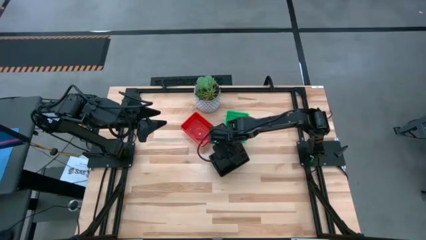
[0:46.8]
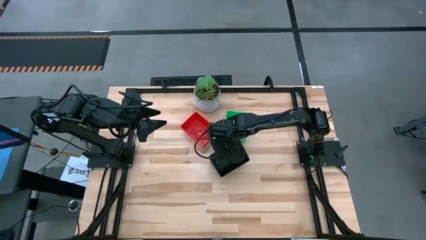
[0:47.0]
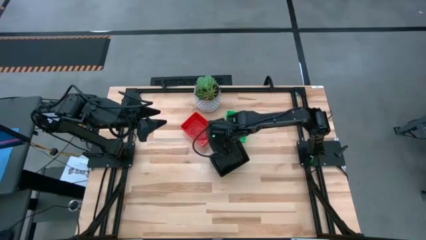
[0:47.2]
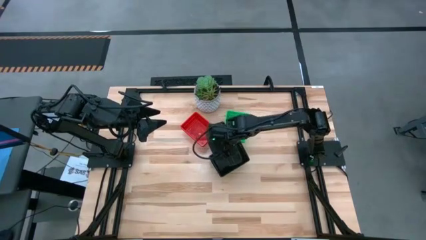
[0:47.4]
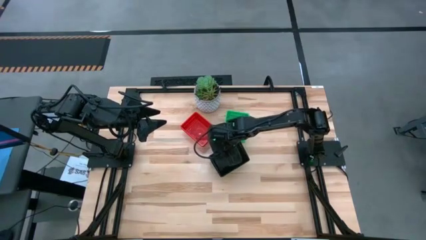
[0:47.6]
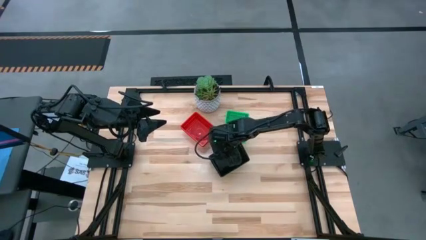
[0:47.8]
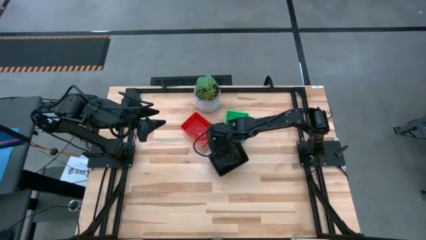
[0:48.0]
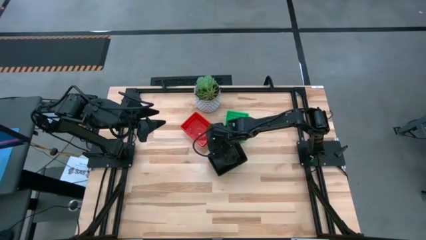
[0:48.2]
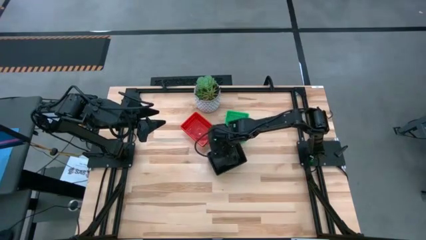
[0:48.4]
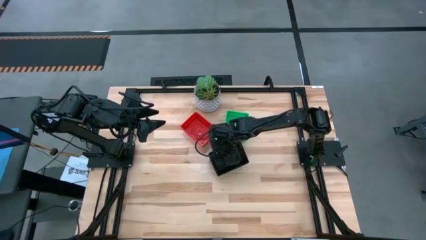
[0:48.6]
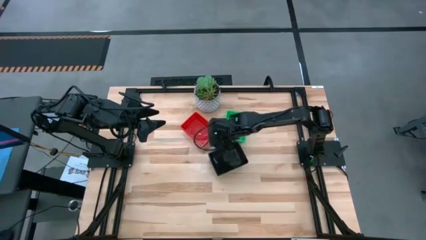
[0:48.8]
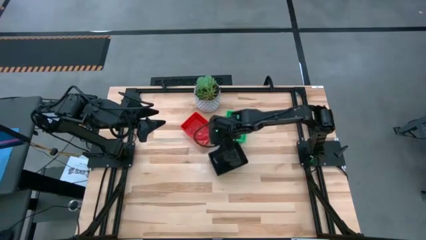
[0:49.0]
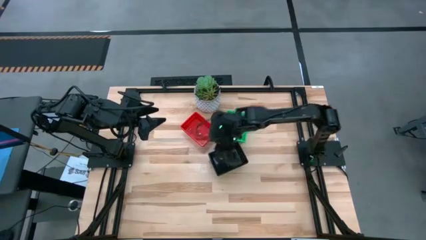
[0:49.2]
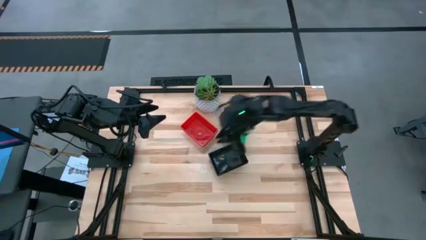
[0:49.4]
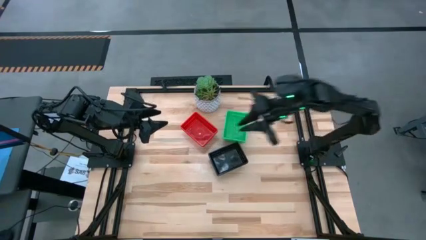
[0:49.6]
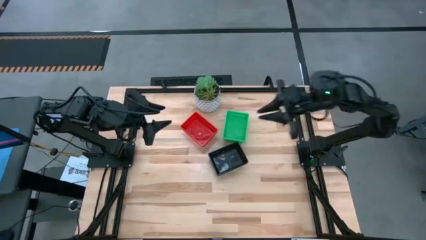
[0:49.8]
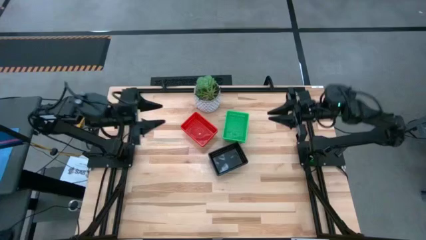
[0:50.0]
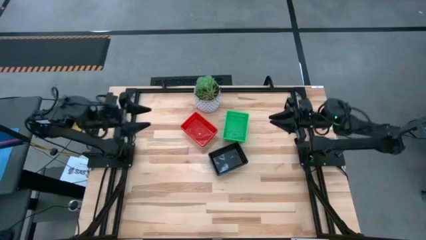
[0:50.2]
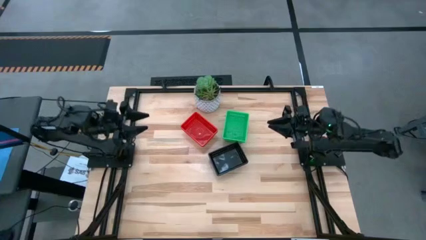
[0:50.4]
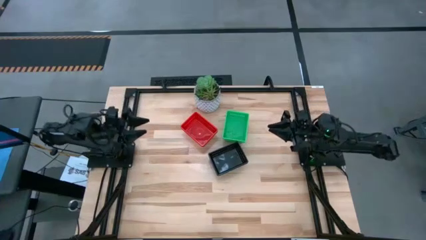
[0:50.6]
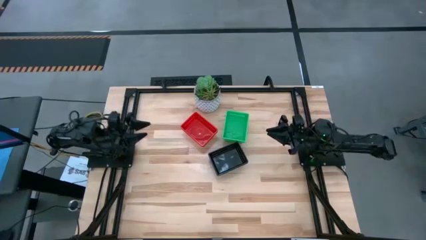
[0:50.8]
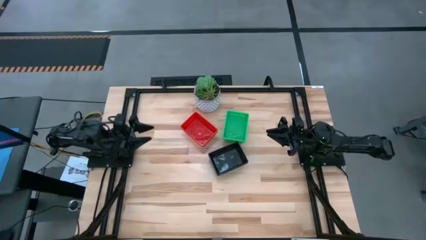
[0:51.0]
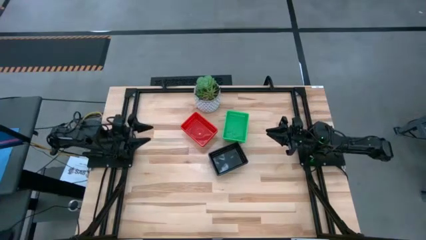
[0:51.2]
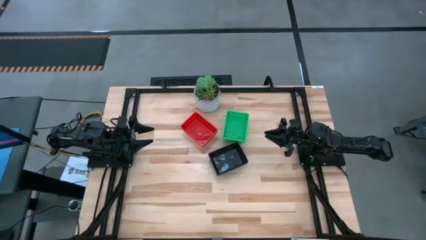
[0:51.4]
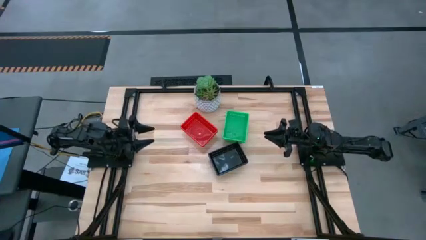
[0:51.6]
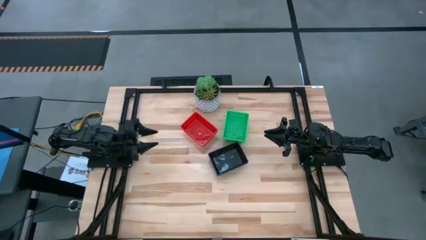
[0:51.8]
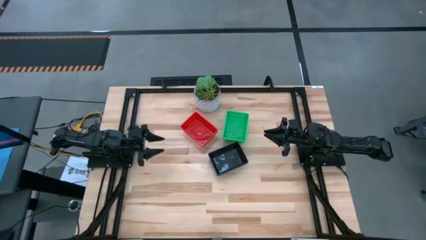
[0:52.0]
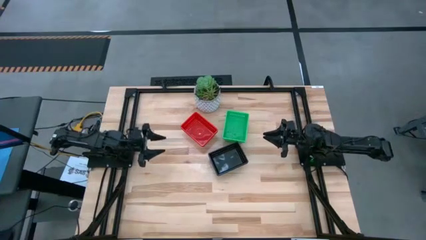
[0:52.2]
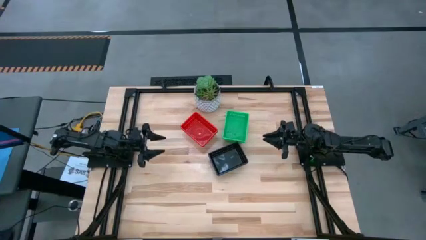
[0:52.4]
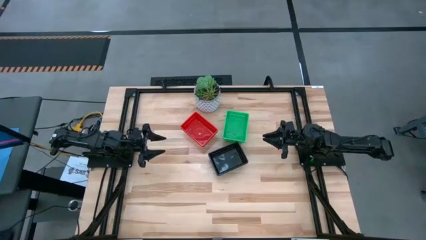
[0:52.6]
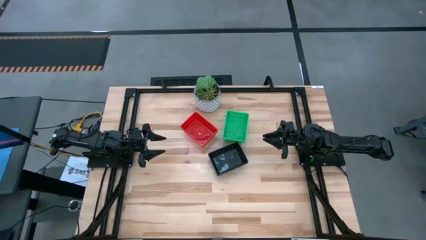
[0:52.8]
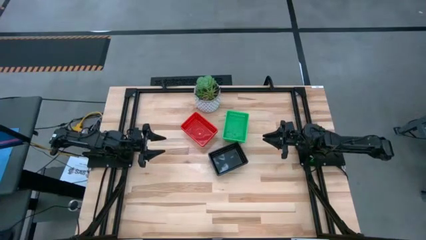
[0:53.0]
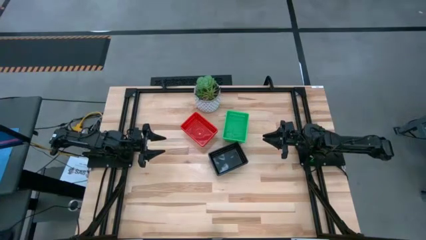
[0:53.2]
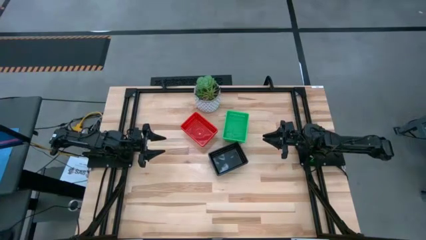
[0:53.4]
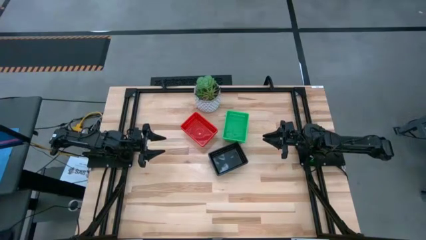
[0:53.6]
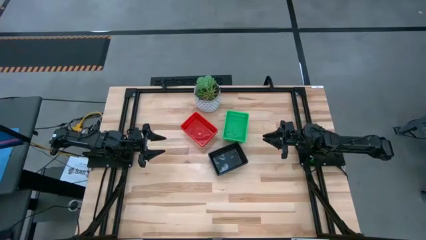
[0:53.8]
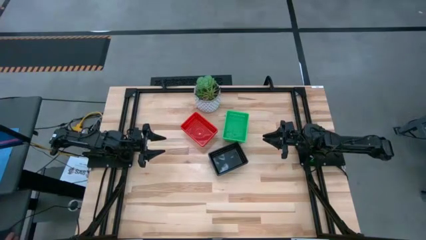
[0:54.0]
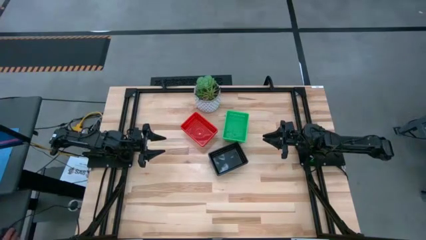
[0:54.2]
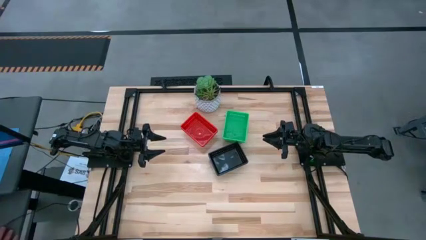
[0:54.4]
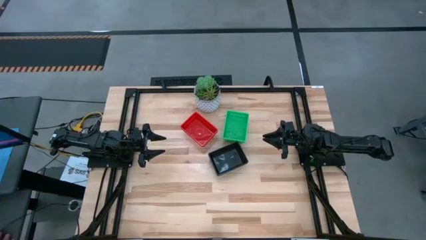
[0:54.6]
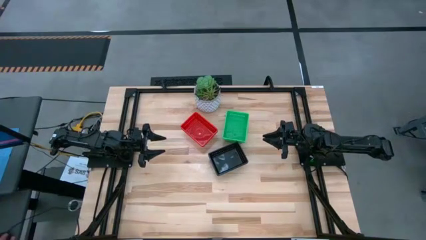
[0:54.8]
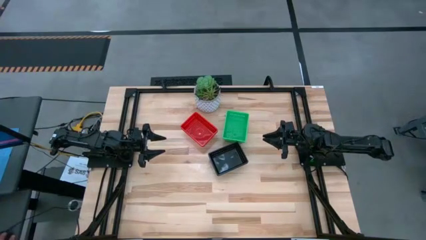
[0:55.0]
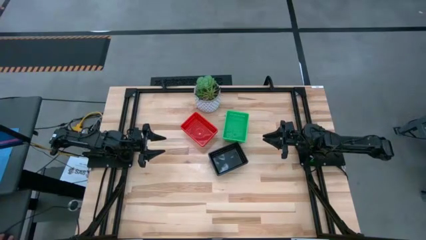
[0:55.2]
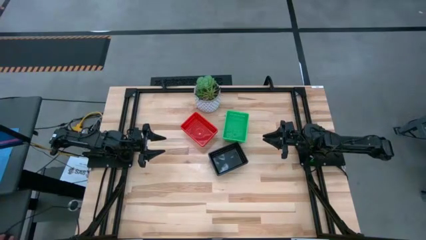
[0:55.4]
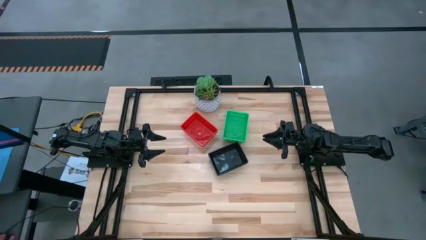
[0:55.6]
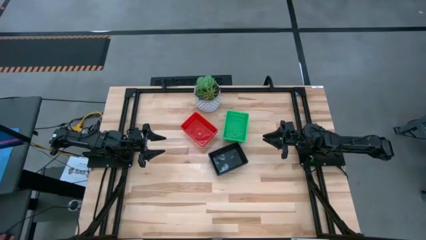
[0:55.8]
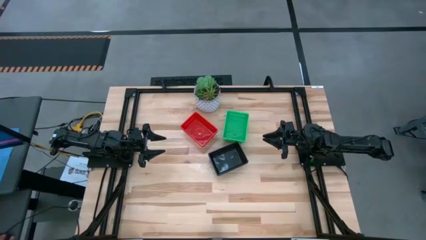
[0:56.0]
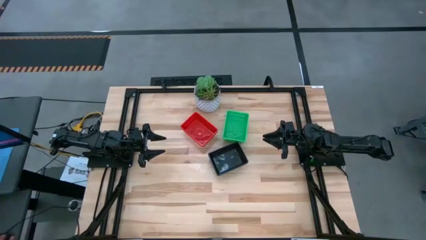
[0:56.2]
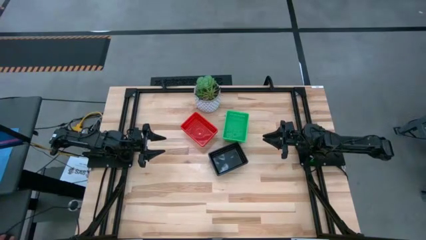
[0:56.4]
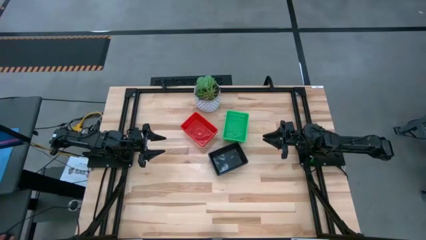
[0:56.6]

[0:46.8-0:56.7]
Return to Home Position

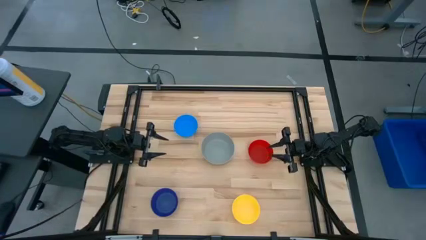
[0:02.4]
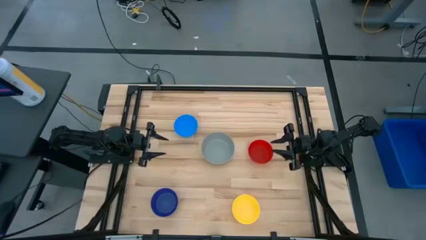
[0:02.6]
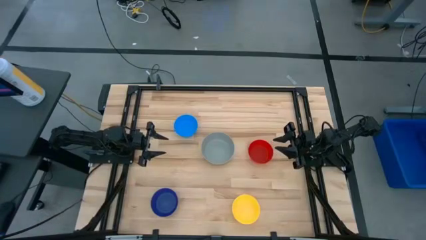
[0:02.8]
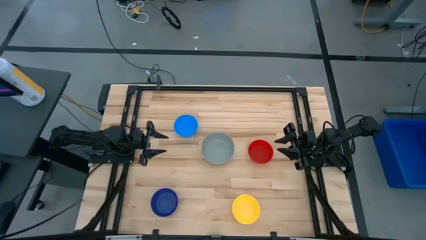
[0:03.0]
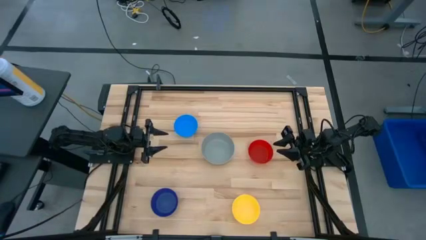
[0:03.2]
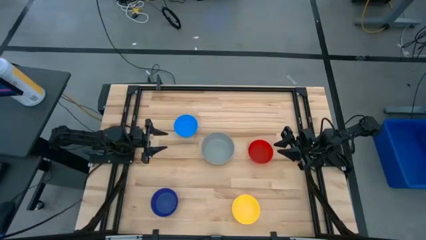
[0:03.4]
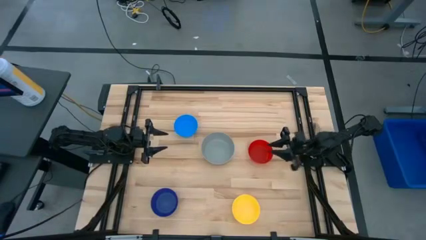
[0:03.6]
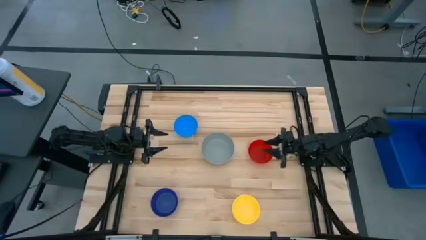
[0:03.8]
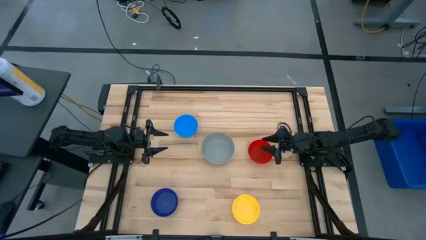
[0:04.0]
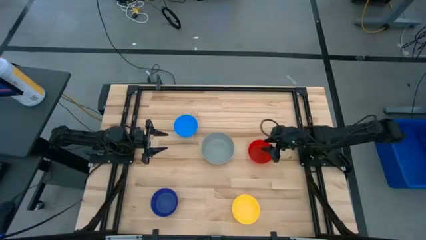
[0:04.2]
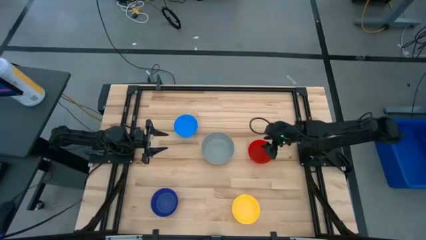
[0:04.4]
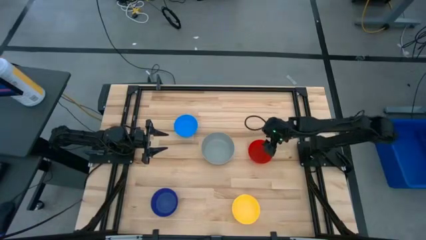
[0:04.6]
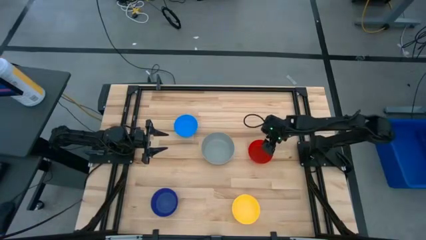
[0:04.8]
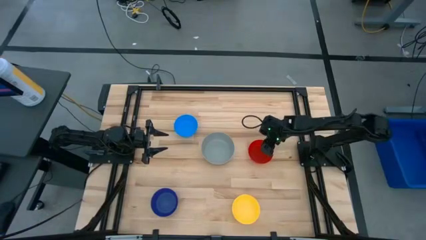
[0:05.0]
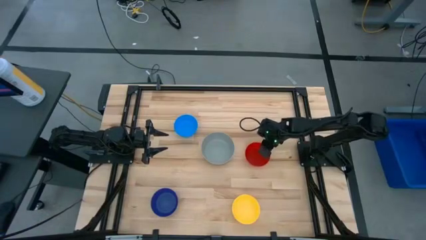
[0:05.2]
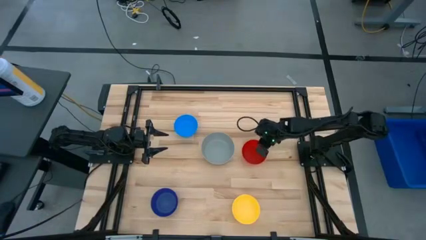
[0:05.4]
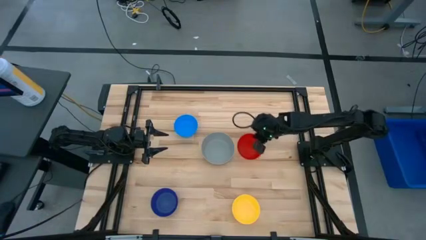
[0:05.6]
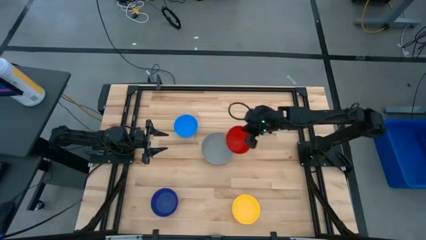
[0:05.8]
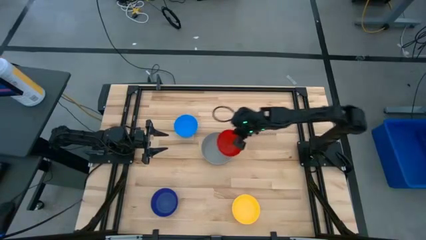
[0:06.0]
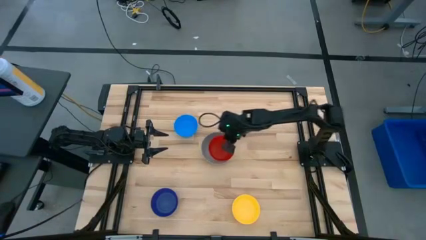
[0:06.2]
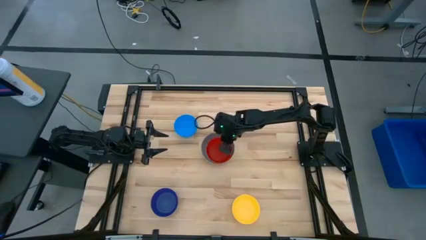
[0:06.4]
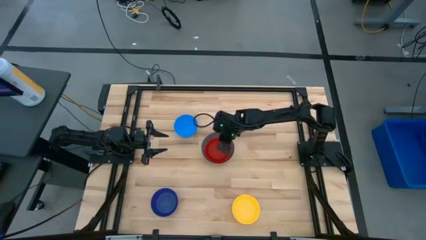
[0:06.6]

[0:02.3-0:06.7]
Stack the red bowl on top of the grey bowl
